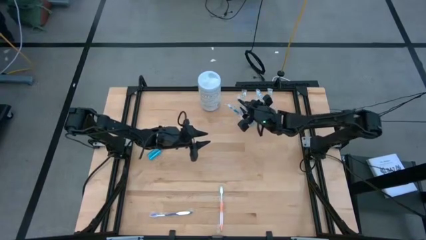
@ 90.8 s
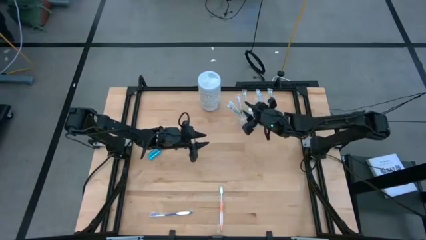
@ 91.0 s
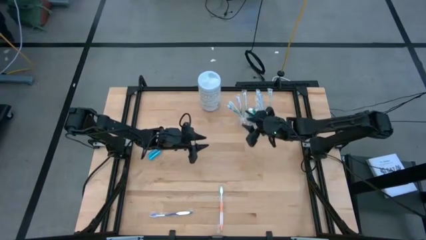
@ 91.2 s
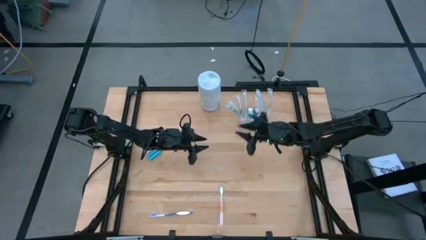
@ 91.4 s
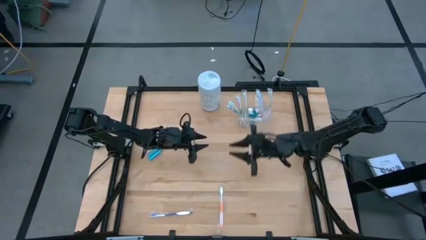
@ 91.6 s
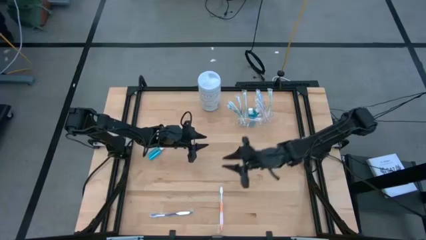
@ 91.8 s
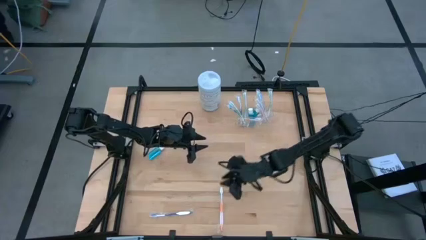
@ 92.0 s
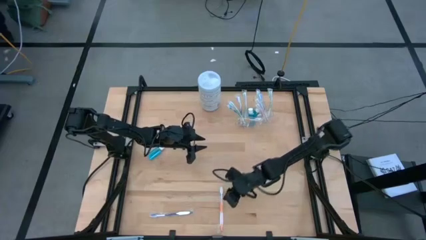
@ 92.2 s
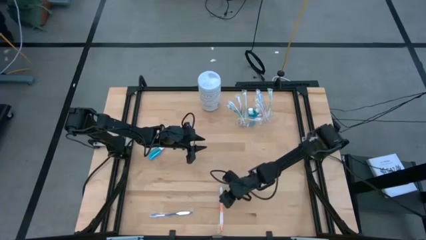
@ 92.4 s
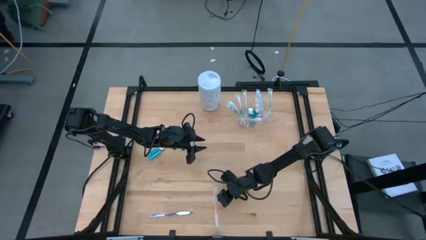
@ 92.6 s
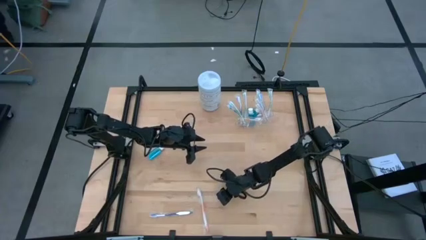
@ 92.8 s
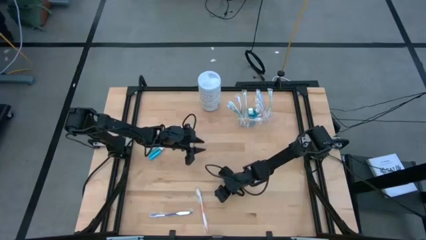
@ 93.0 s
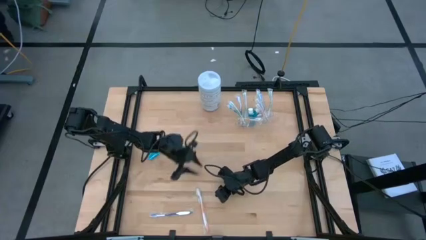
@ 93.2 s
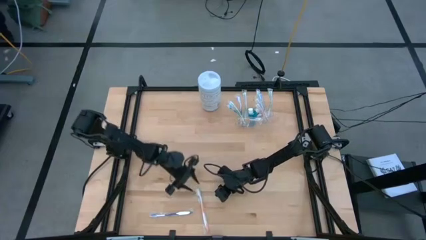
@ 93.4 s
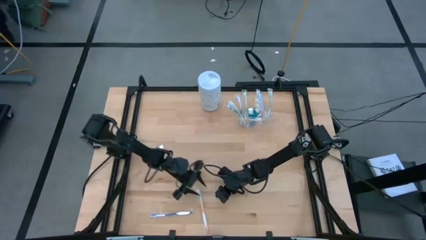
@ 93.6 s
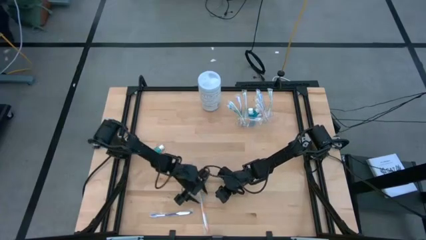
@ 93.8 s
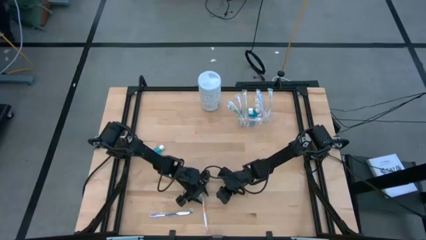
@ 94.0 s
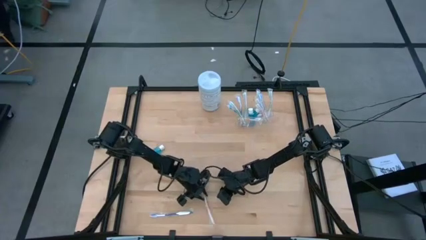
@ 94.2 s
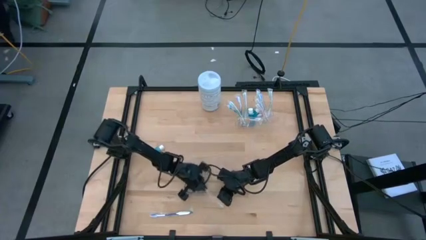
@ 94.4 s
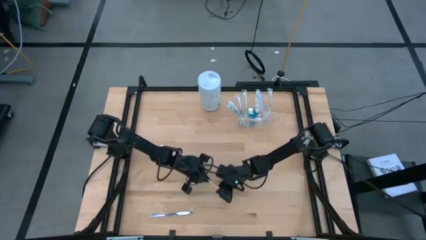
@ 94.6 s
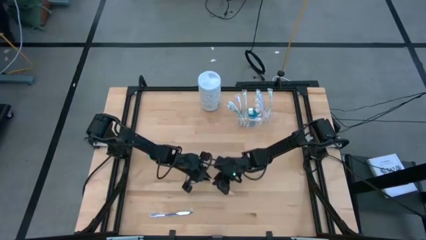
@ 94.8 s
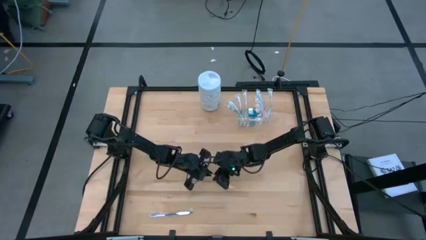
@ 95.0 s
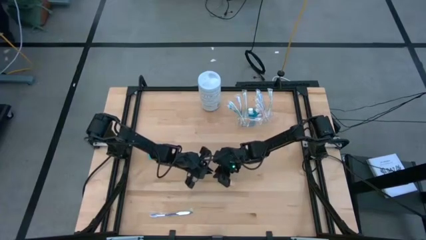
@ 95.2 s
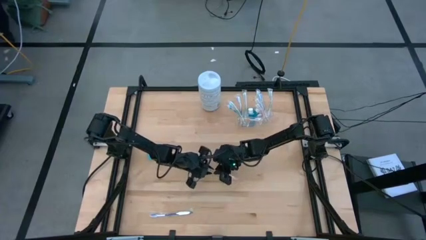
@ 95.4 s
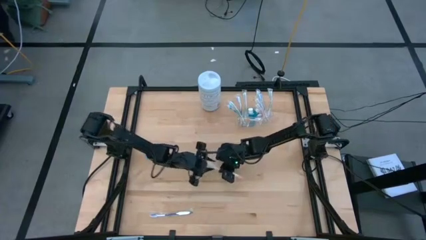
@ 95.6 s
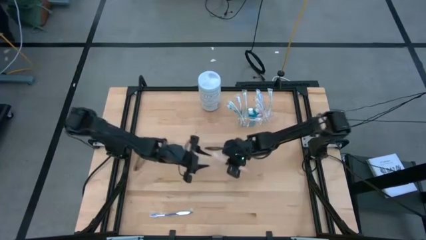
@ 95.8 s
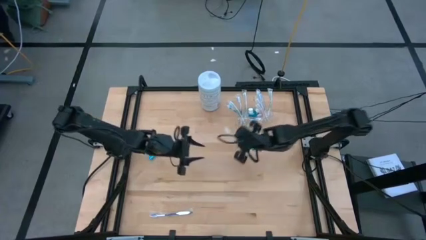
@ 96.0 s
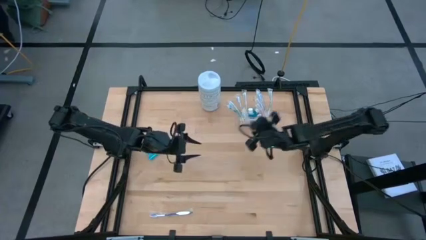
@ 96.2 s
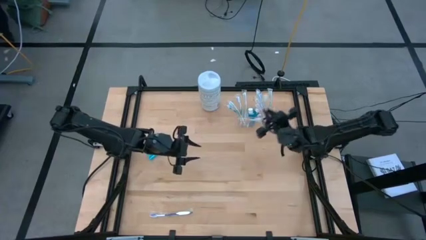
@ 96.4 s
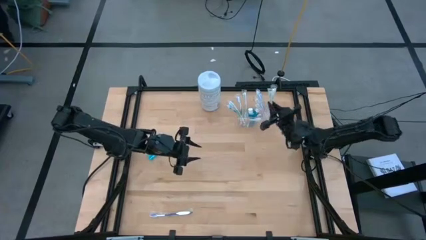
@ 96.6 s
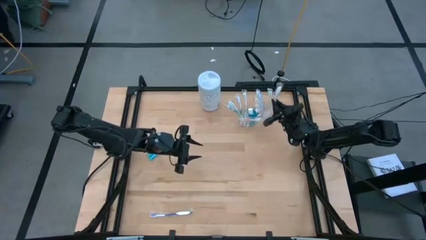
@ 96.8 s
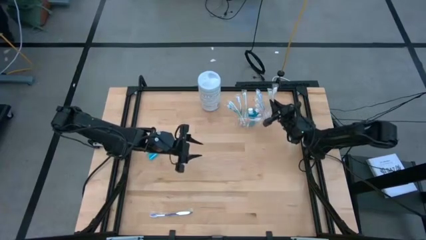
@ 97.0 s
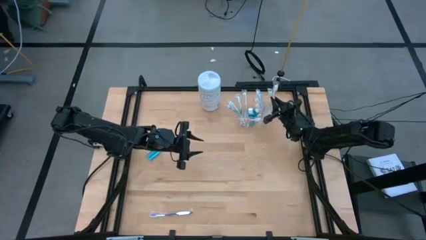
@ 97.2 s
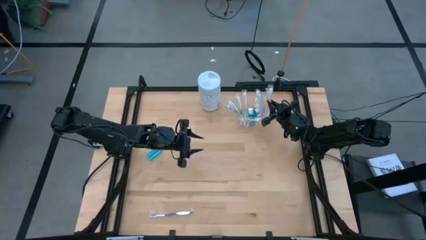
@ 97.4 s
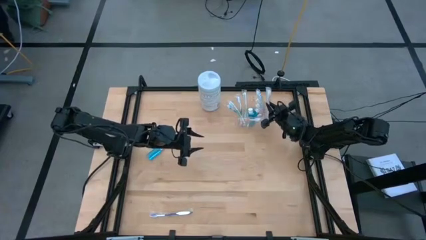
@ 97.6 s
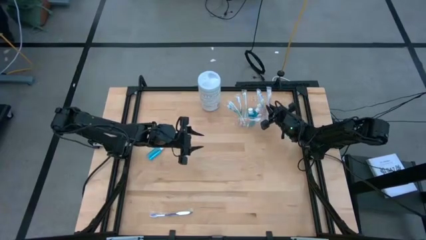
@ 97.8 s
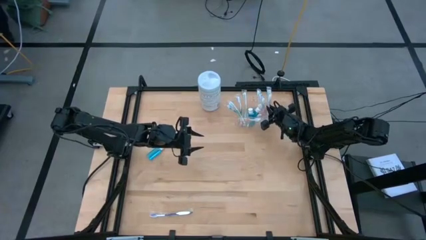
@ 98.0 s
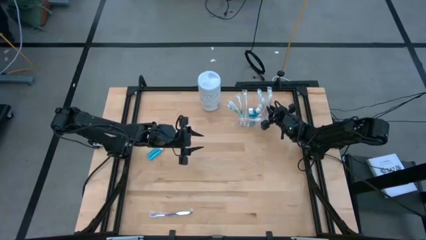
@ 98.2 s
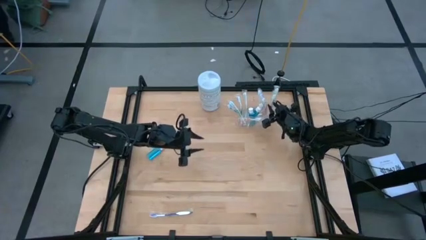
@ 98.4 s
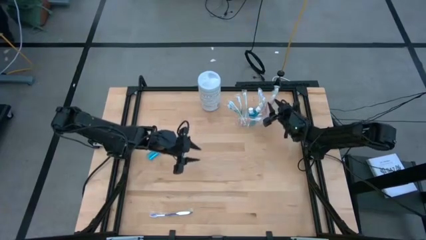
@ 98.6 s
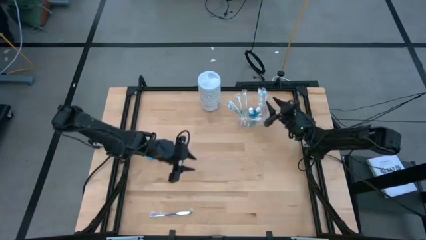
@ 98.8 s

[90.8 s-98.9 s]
Task: Pick & Place toothbrushing station
Put the white and orange toothbrush into the transparent mesh organizer

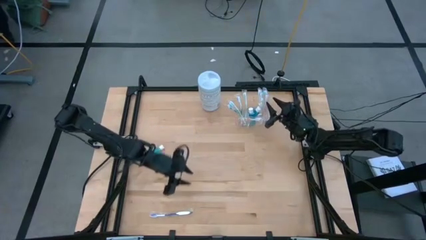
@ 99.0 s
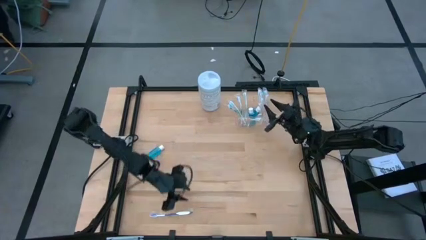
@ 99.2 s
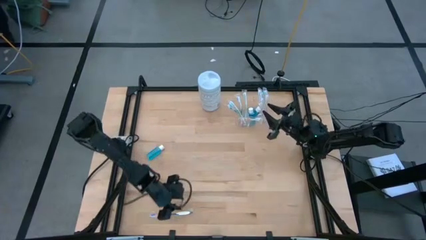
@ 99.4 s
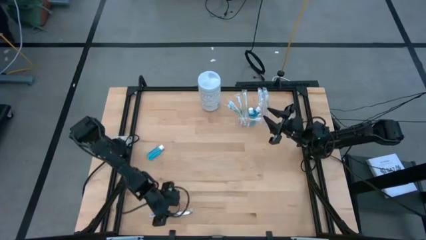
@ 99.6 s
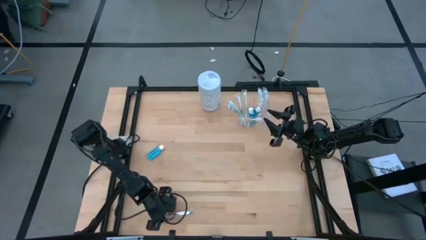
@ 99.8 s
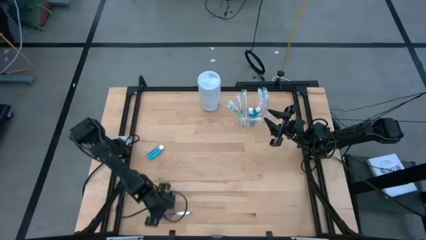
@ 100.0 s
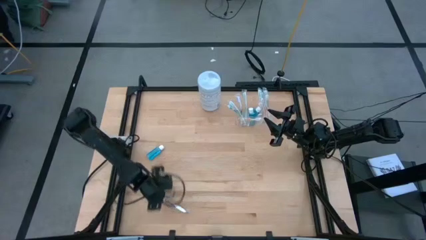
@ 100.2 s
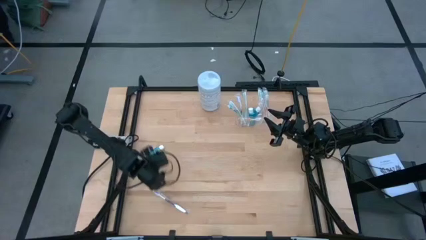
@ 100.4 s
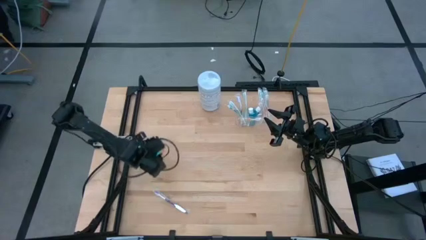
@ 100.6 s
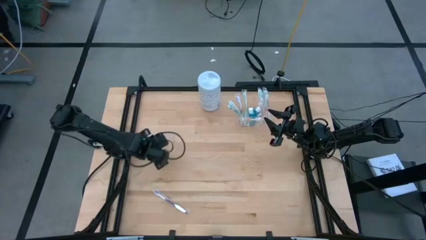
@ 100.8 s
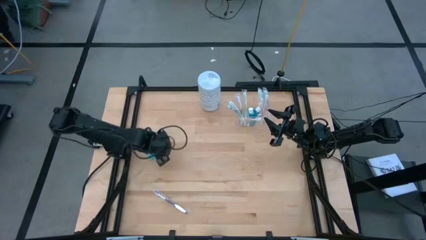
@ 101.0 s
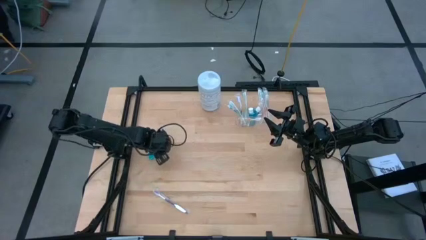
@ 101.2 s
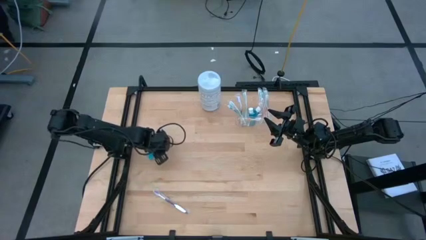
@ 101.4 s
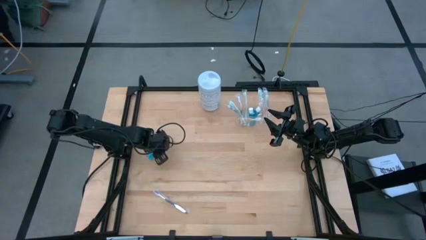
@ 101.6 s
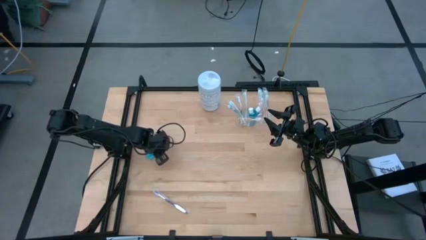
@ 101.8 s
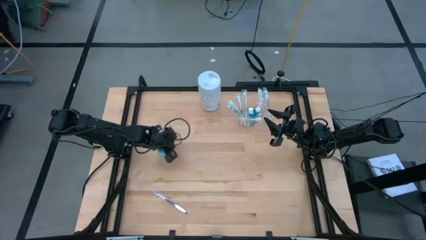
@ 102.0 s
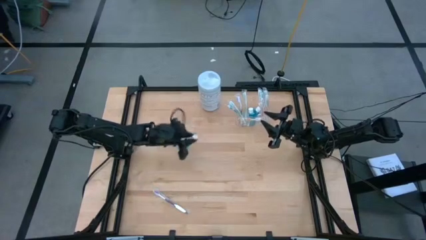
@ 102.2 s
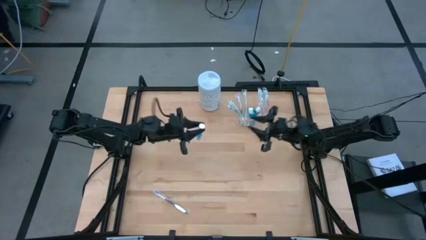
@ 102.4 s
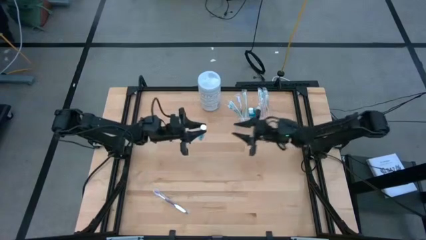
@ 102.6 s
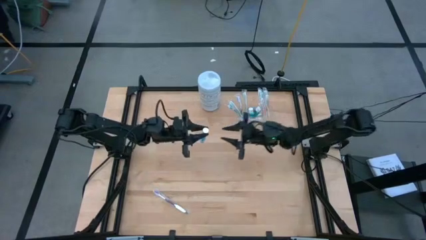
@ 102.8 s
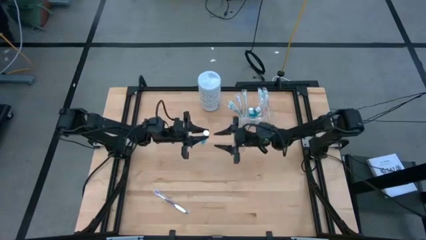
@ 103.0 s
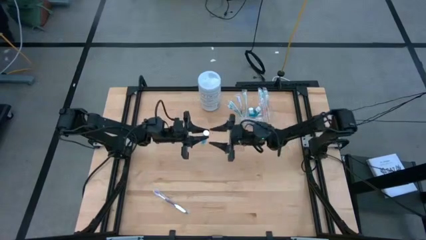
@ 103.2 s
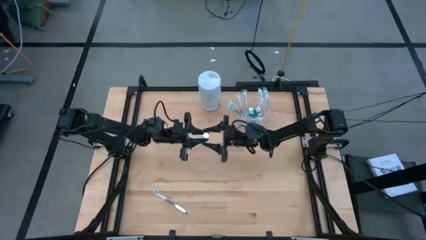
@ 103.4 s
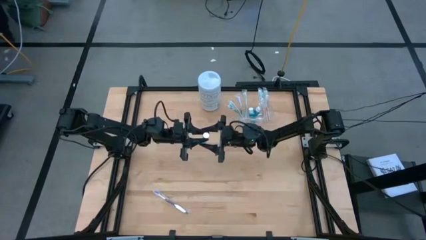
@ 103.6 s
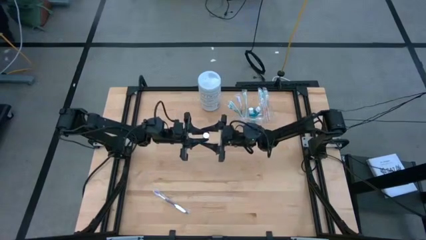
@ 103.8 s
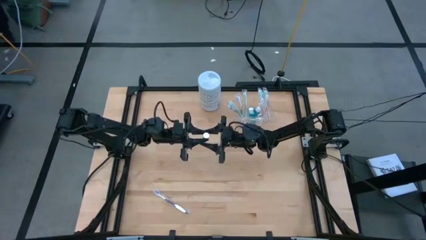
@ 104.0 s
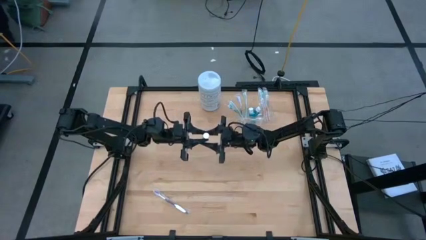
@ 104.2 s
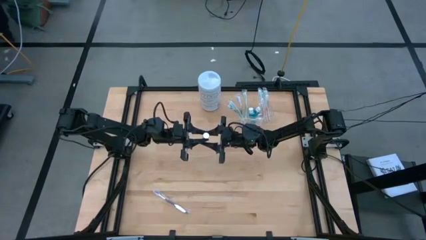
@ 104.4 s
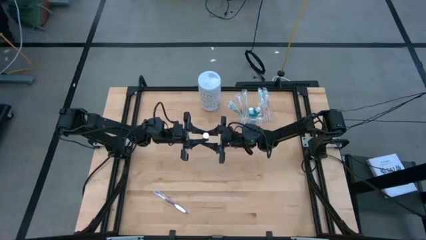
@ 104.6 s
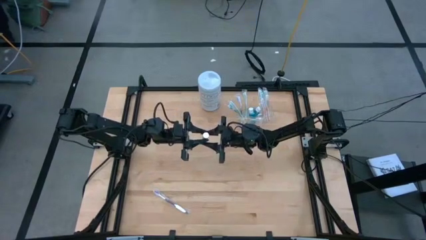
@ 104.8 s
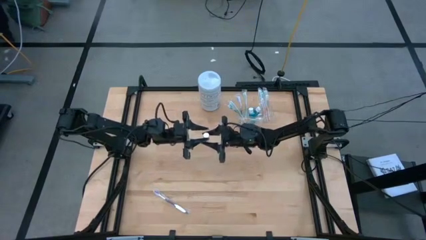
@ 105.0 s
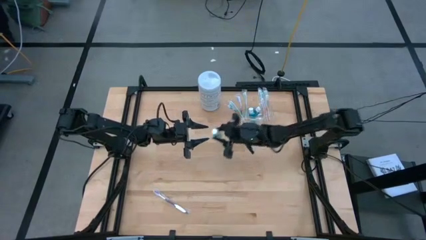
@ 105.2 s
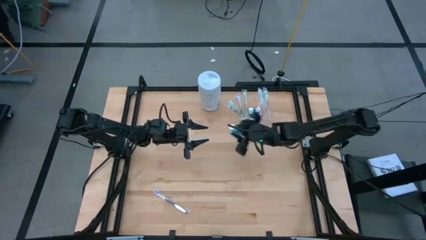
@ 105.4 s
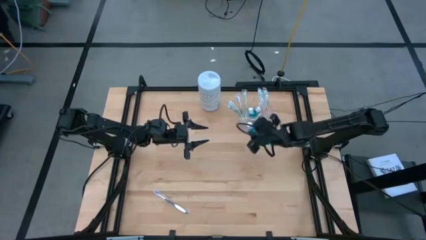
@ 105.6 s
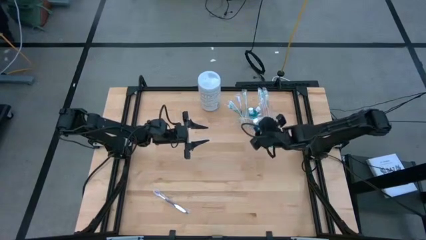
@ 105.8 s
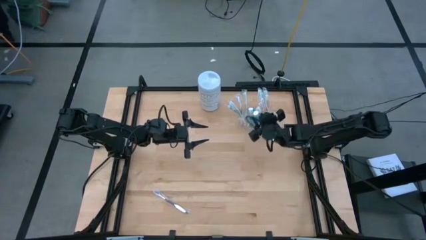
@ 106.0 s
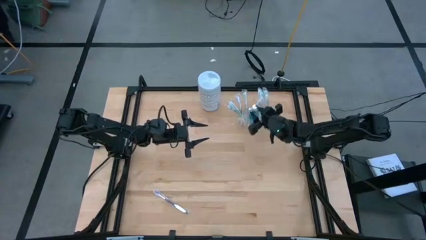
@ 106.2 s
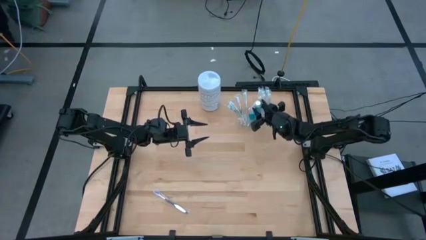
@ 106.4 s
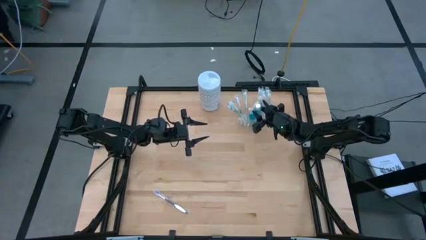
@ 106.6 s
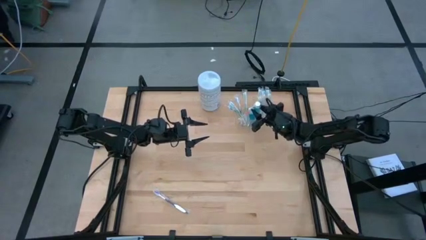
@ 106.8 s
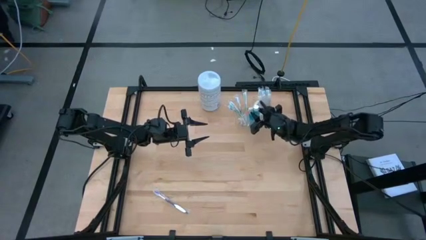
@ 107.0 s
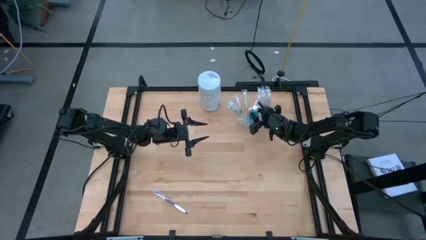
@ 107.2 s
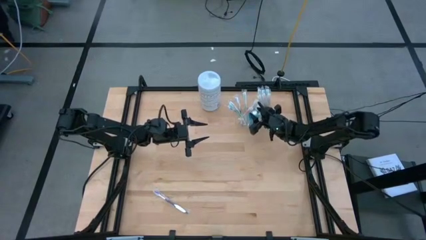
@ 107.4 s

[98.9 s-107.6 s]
Put the mouthwash into the transparent mesh organizer
